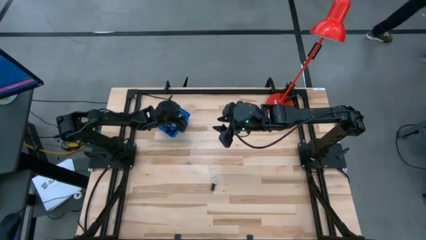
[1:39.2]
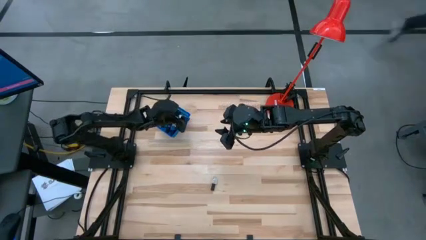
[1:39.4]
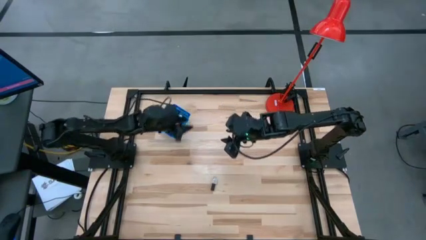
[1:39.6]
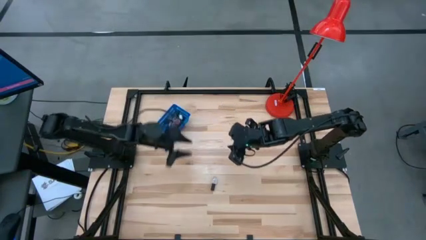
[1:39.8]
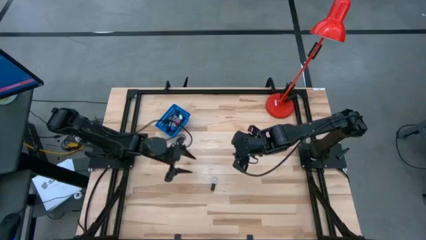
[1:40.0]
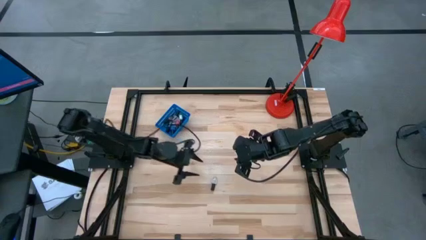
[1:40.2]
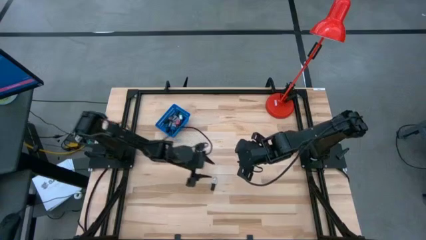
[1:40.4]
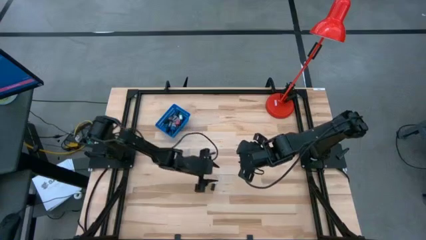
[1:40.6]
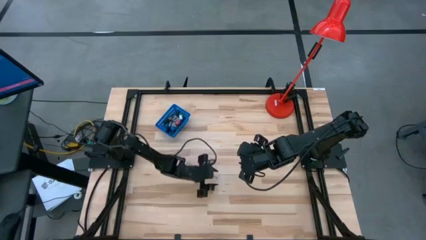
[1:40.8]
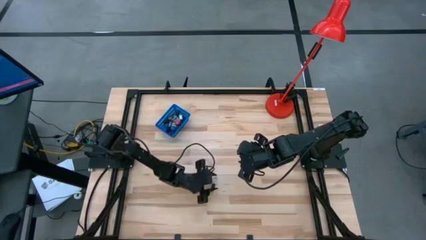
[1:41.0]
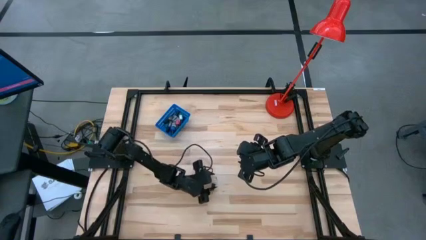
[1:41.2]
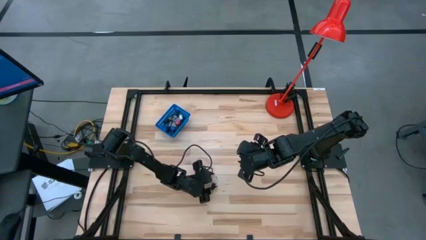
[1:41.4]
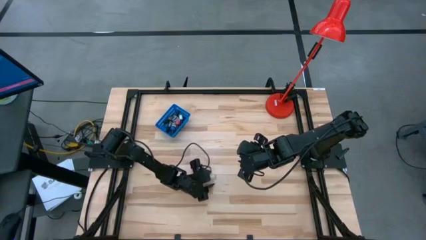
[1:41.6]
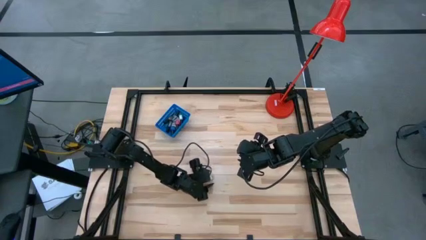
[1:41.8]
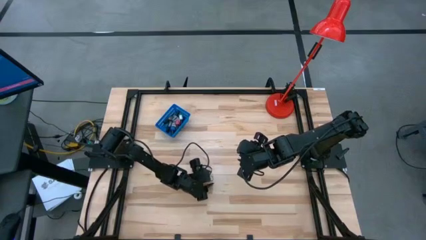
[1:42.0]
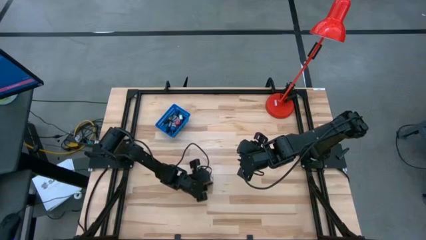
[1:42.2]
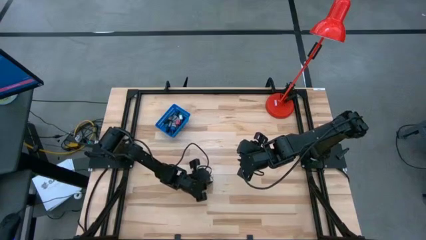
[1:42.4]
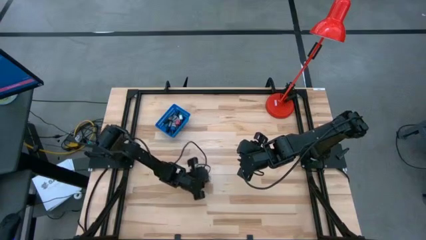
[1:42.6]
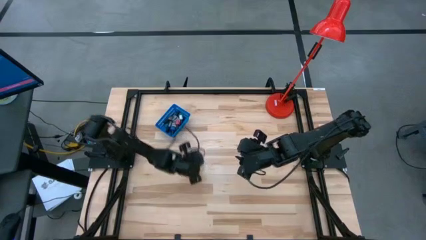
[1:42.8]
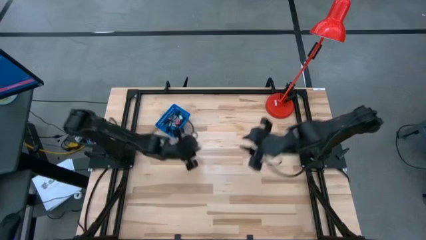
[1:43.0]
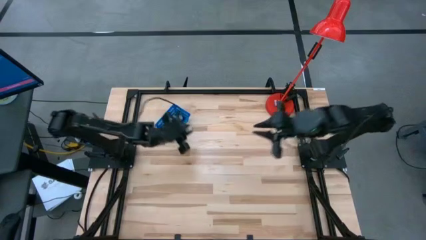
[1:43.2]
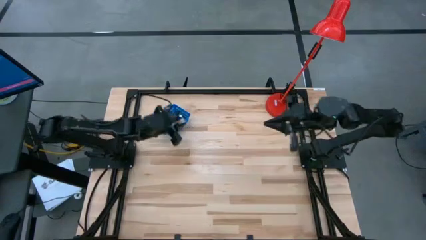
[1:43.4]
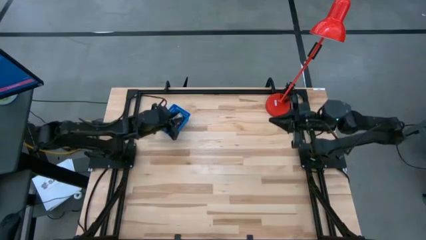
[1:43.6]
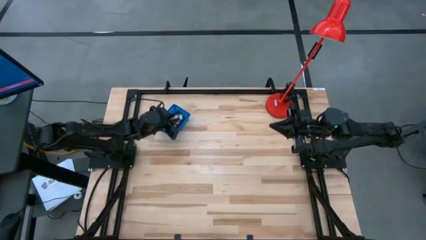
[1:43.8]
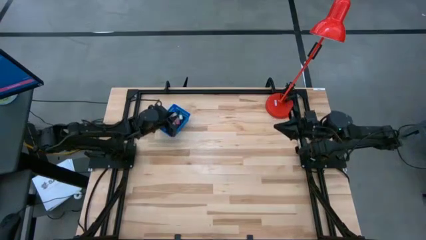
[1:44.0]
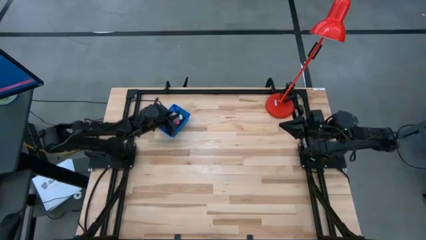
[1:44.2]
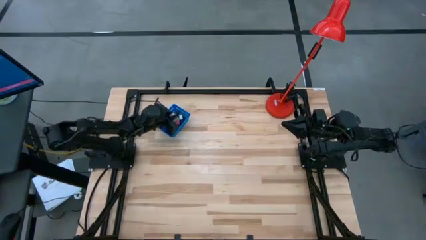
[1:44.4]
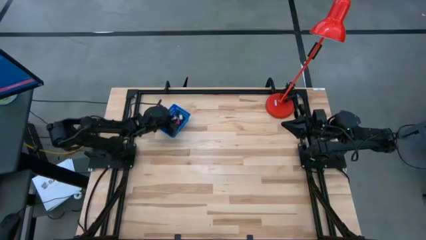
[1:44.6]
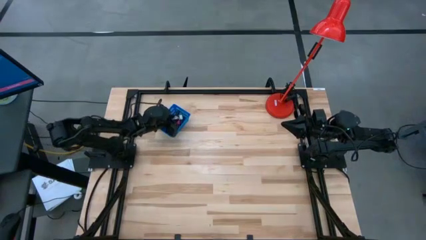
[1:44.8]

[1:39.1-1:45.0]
Task: Pick & Place Nail Polish
Put the light gray nail polish bottle into the blue bin

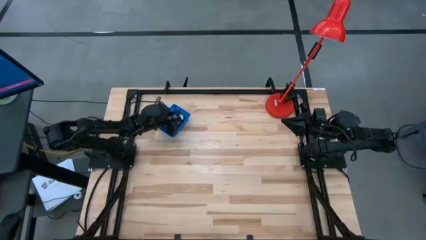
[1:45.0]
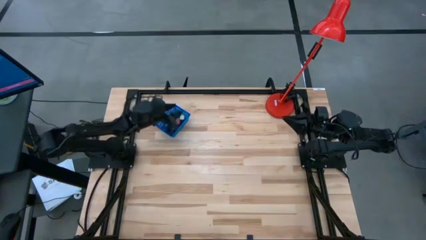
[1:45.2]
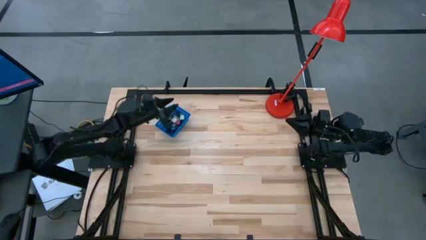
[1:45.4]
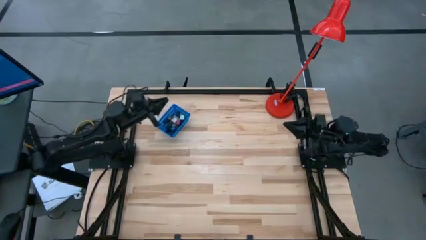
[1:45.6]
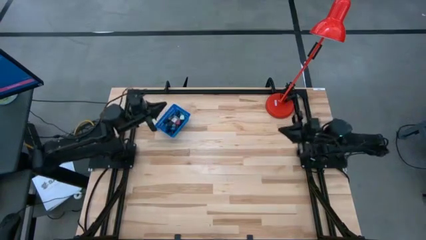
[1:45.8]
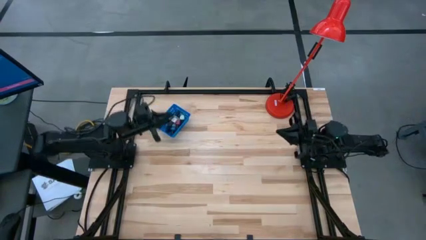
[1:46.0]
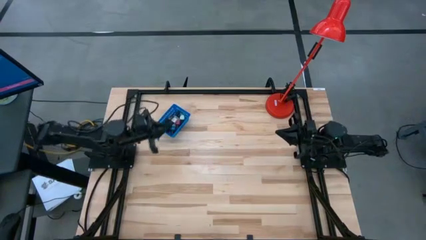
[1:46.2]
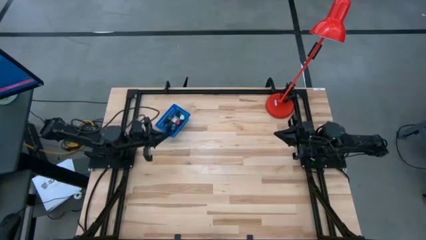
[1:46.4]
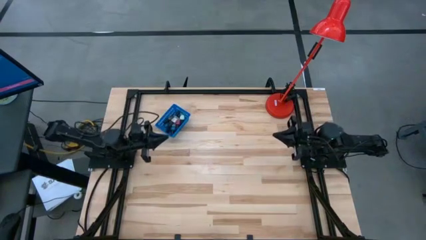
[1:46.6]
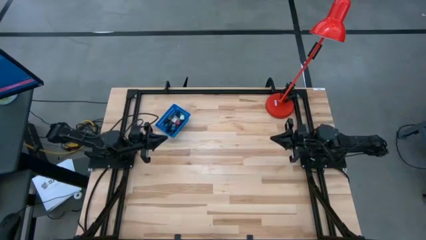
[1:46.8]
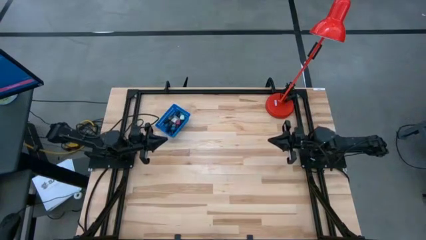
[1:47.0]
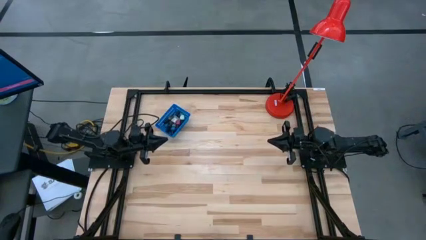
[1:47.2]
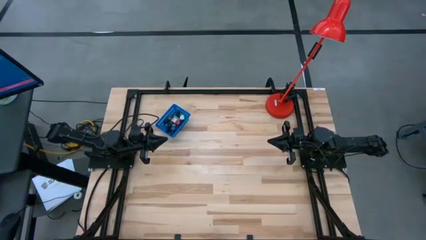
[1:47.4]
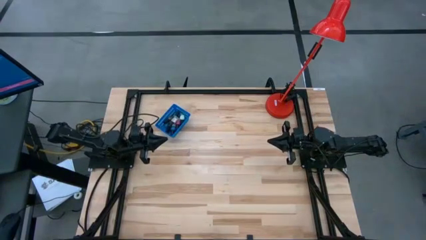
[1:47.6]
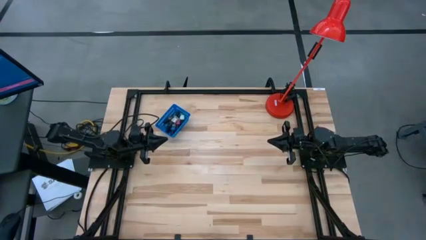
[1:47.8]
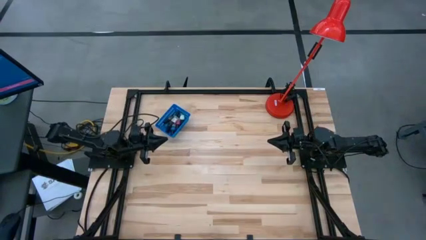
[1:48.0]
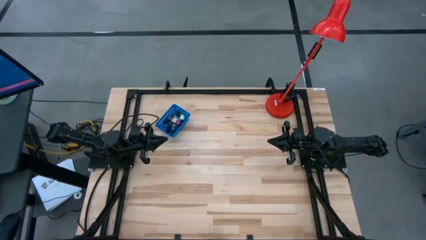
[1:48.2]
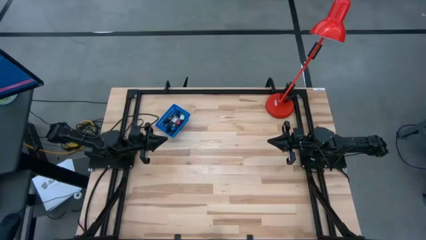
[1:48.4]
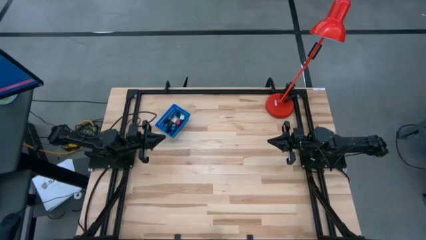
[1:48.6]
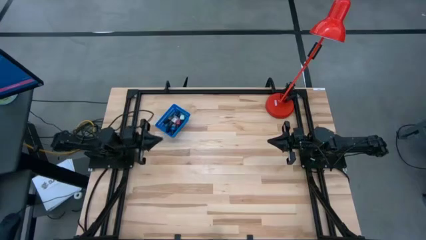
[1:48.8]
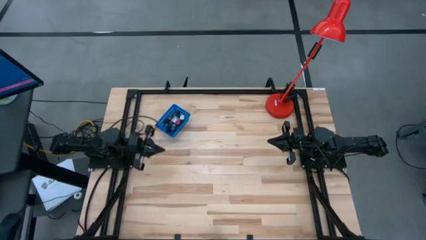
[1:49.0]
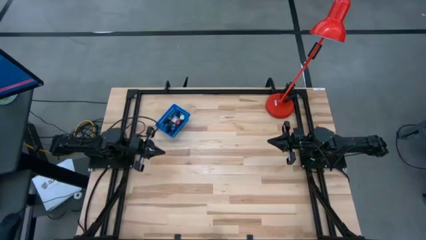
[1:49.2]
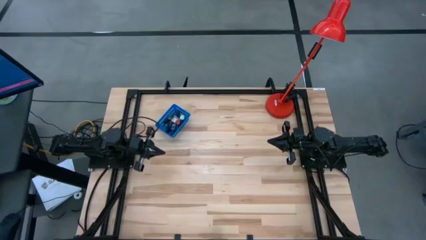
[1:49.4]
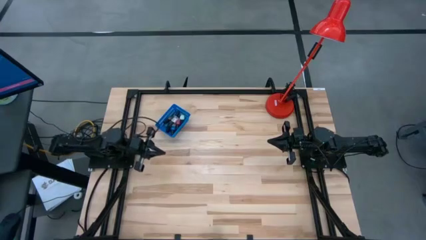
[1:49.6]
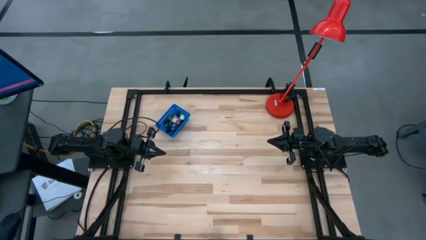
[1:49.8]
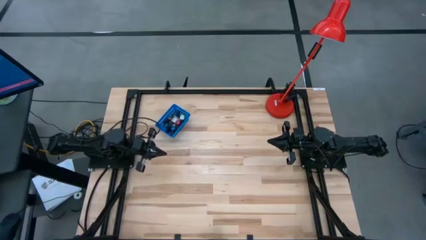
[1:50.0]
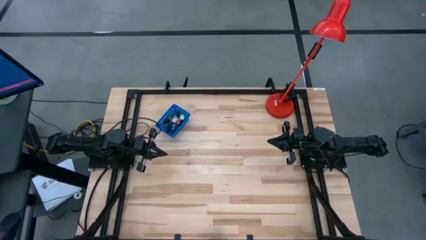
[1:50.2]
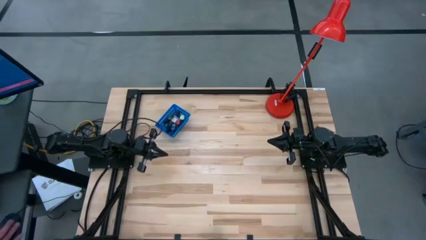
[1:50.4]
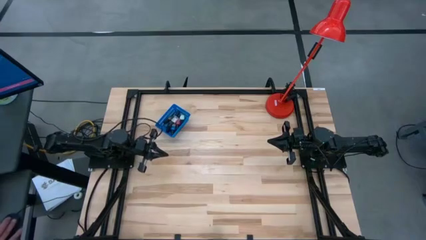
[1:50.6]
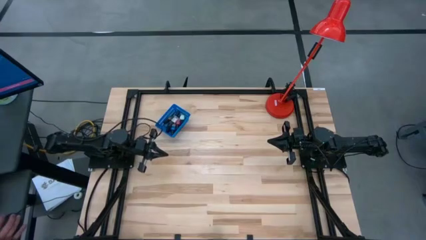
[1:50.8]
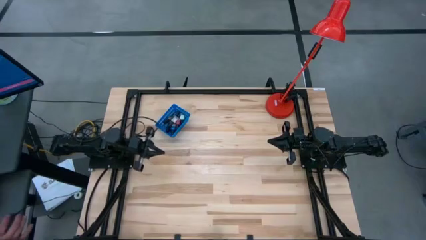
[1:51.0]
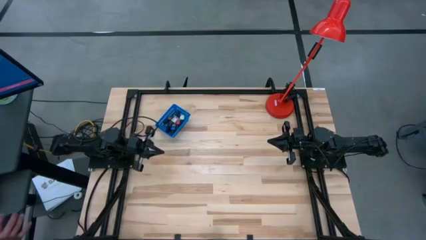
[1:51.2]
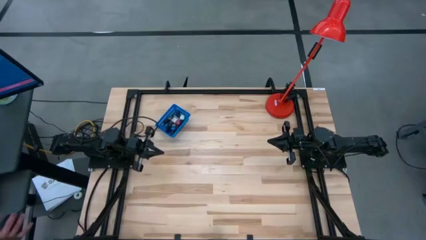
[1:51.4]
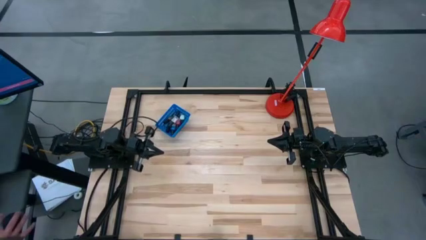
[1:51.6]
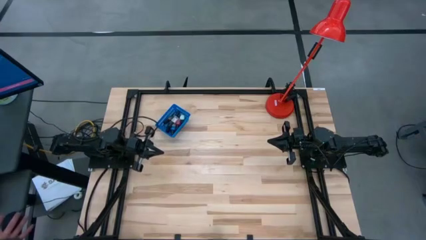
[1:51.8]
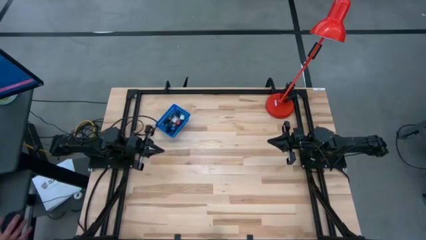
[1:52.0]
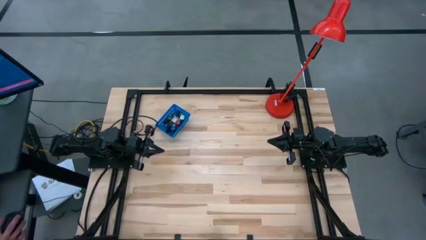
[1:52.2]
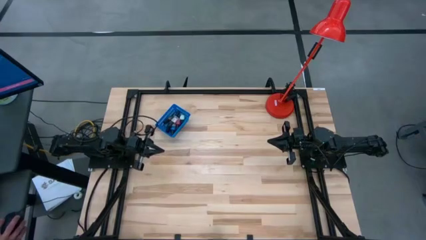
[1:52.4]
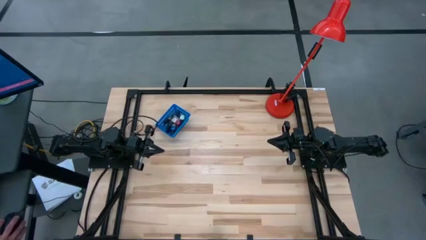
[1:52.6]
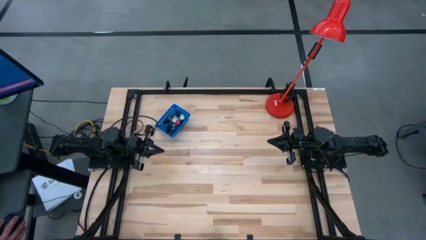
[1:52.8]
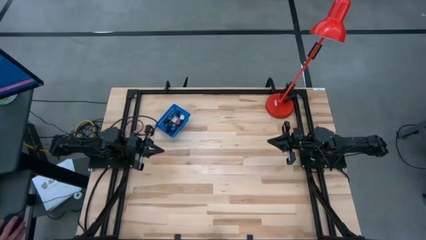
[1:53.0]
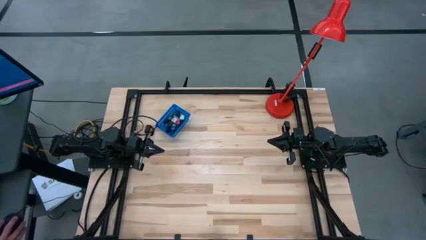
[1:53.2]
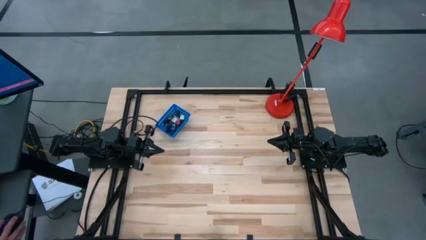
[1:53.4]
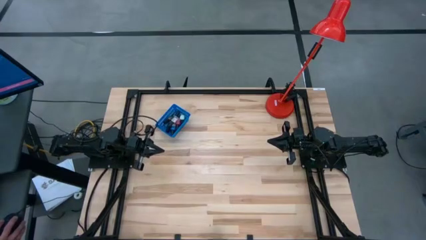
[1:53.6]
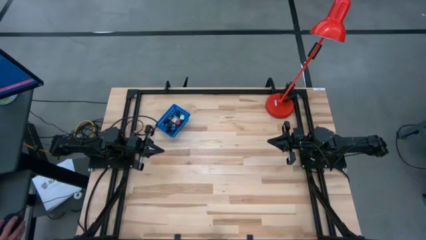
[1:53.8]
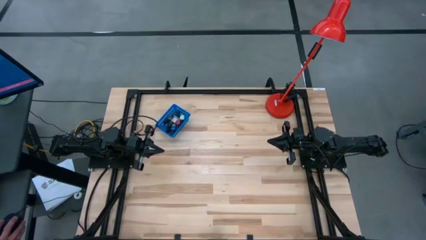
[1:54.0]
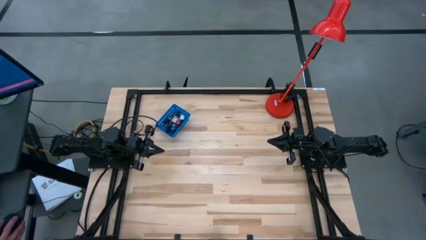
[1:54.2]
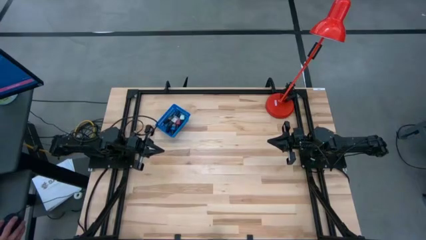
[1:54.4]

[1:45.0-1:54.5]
Return to Home Position
